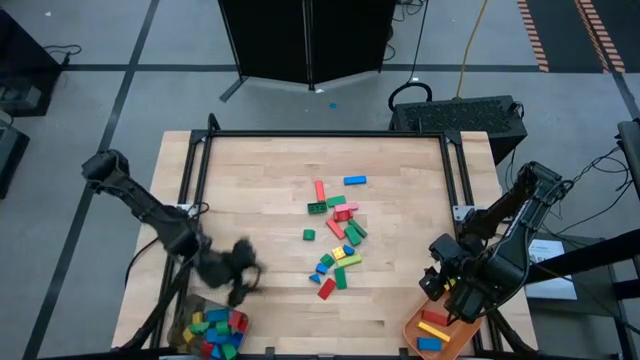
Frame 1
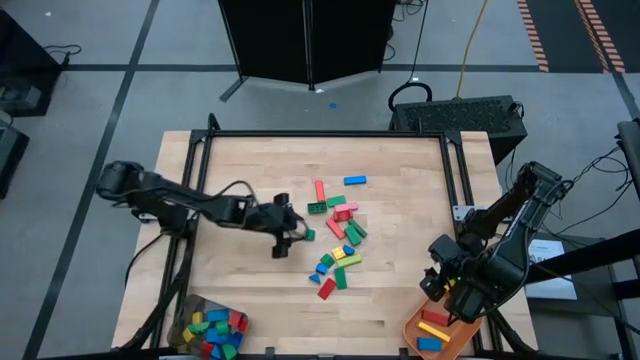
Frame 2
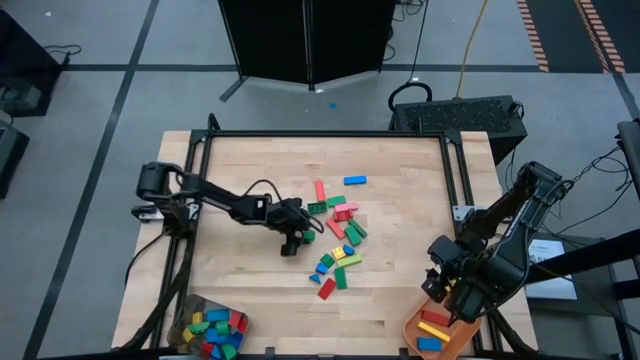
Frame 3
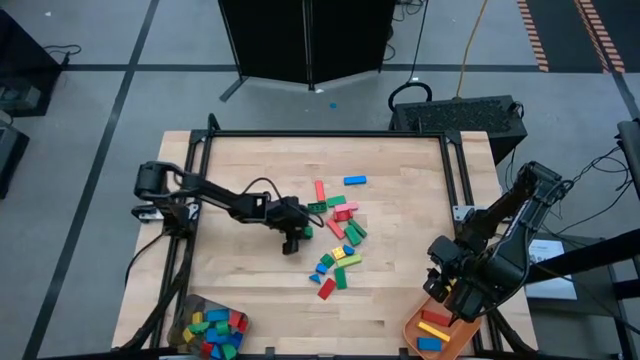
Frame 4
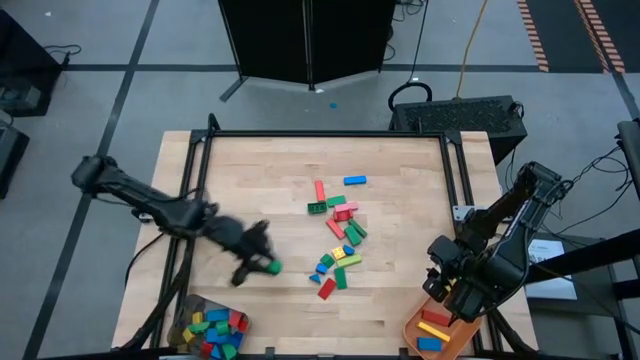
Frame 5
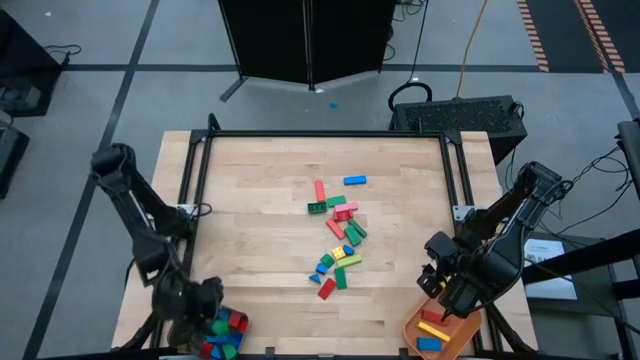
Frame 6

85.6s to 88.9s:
Task: Sort blocks by size
Put the green semicircle block into the black bin

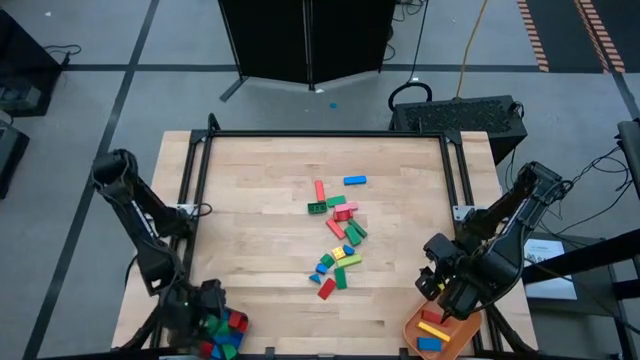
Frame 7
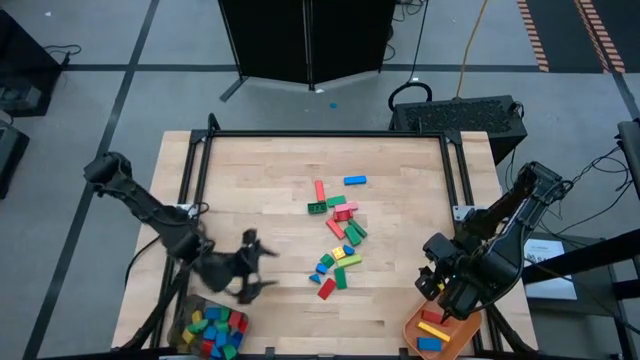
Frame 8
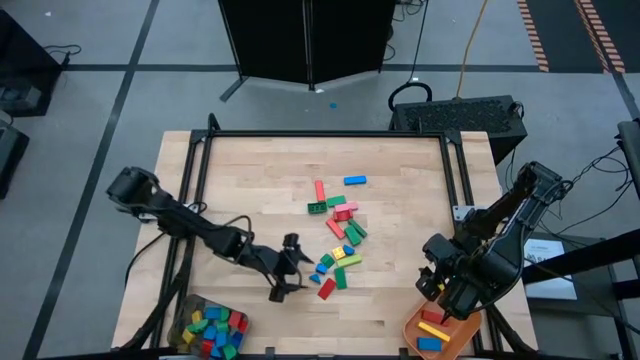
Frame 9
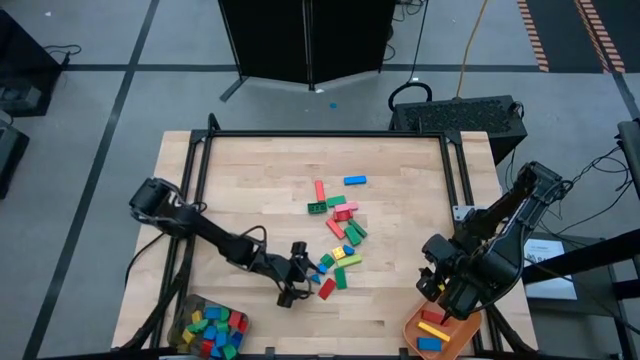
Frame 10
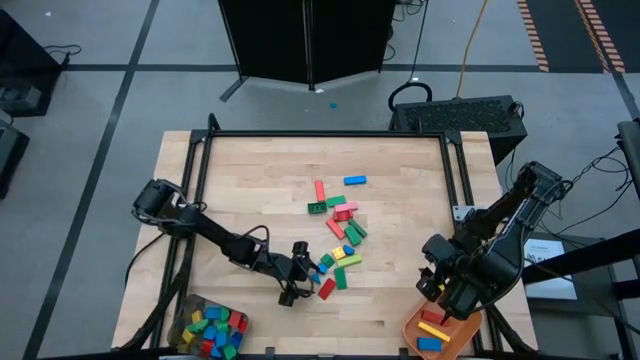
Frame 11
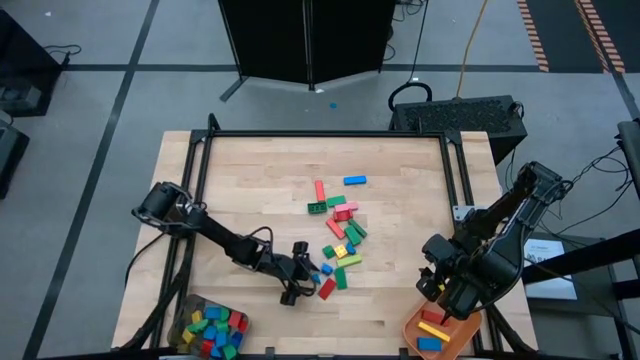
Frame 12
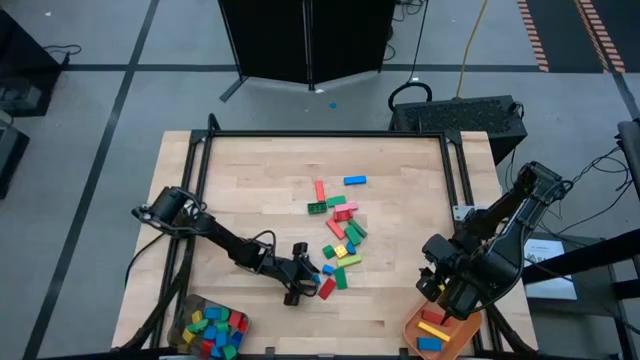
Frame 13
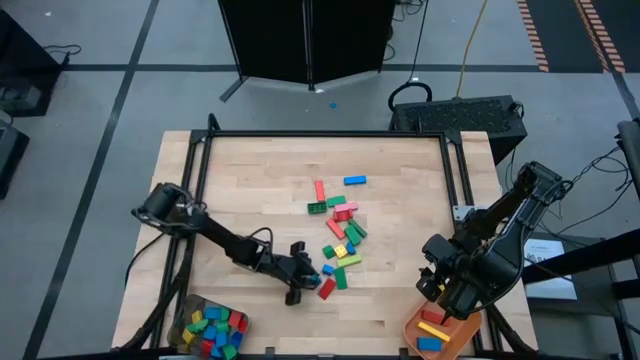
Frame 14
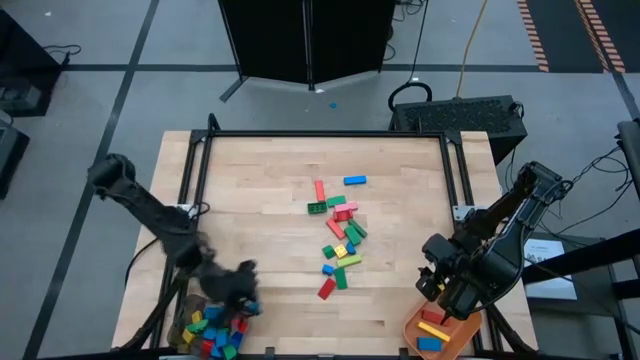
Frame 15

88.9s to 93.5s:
Put the blue triangular block into the black bin

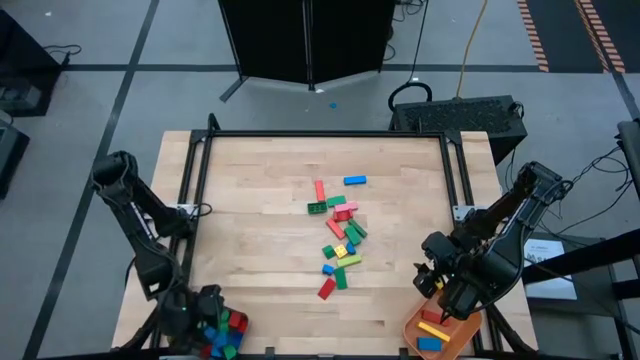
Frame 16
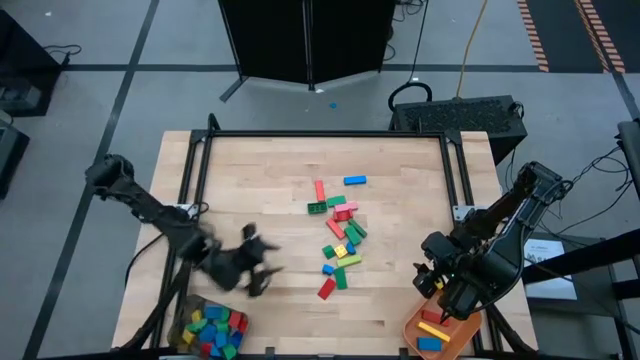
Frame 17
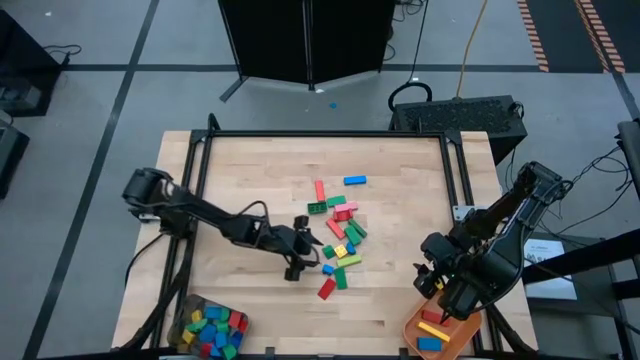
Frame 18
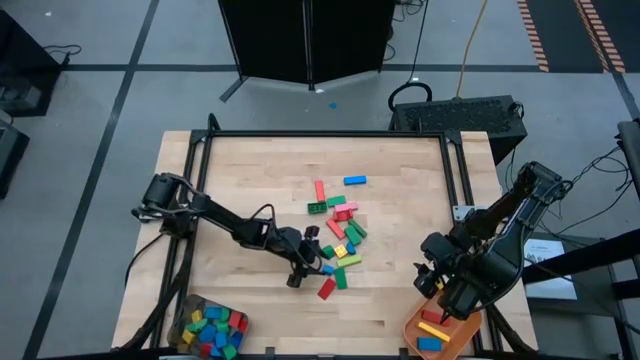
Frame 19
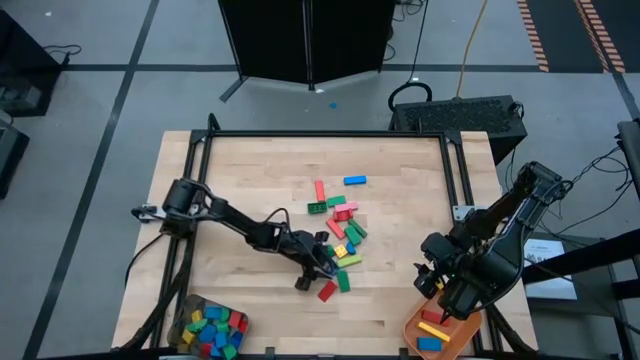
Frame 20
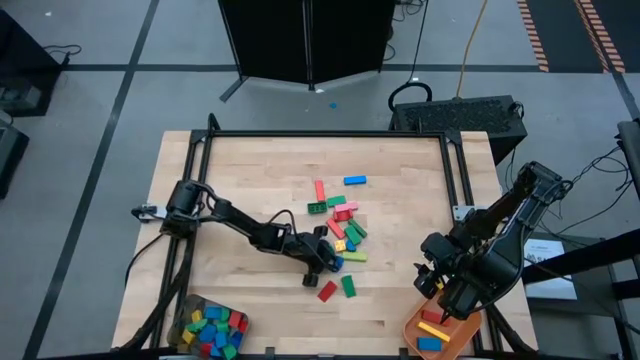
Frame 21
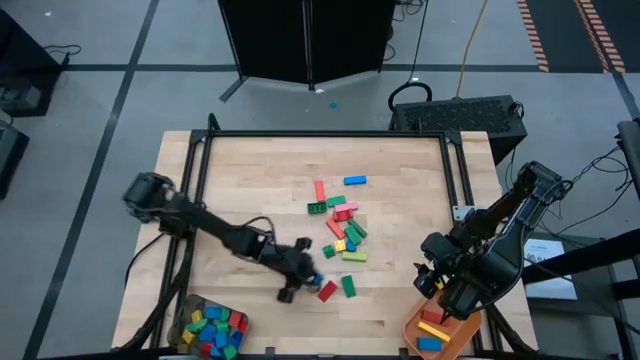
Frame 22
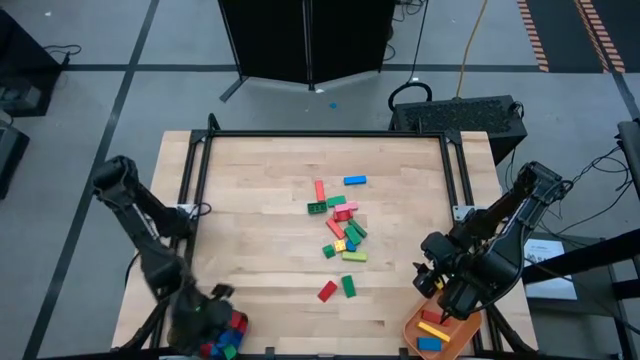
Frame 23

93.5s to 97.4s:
Put the blue square game piece into the black bin

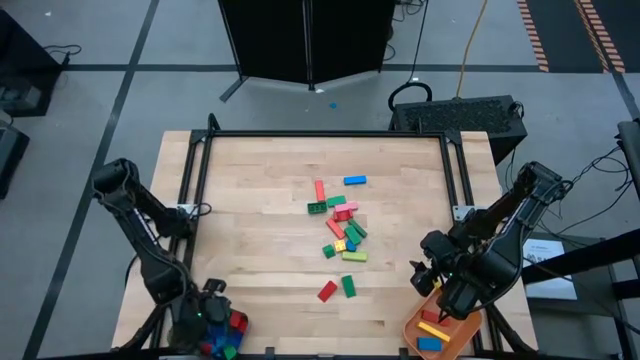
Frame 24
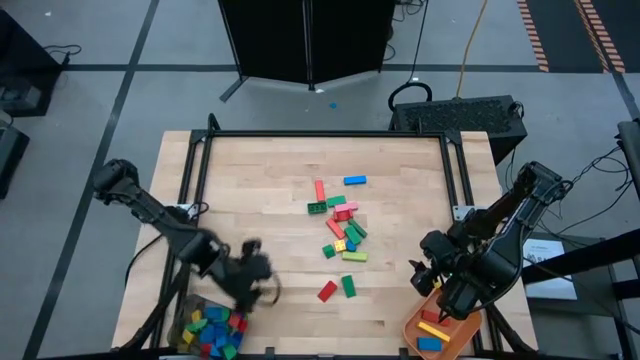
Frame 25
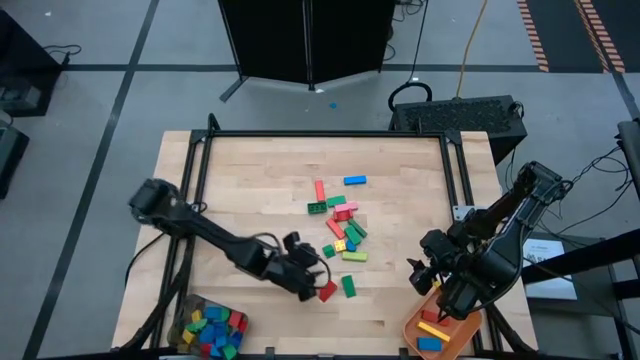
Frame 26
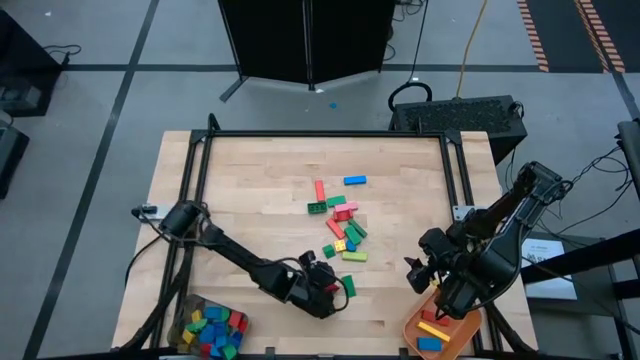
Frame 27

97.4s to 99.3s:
Put the red triangular block into the black bin

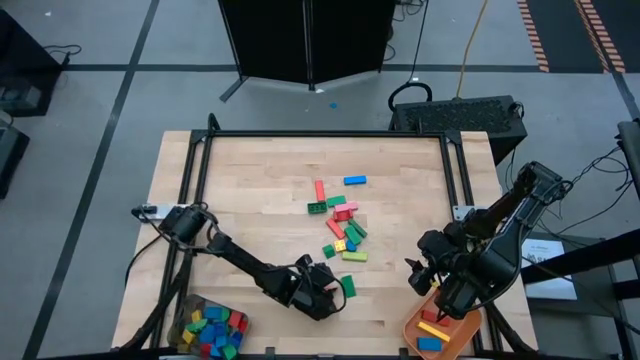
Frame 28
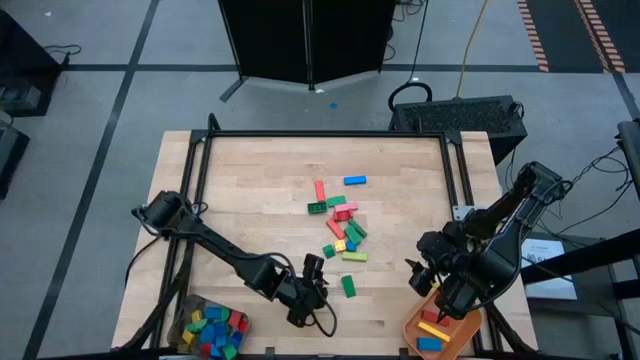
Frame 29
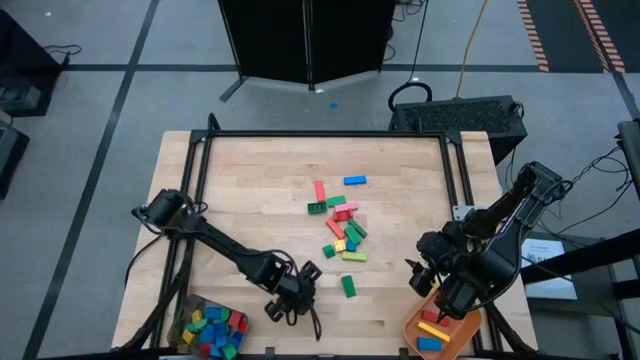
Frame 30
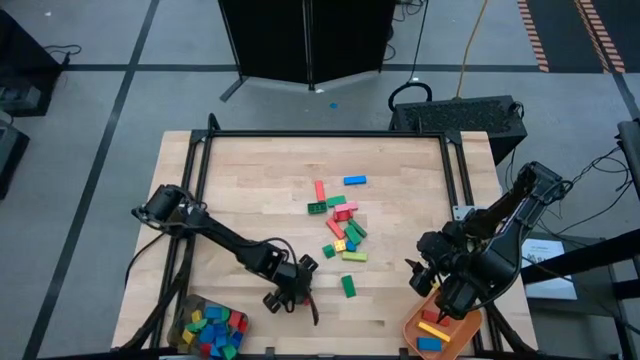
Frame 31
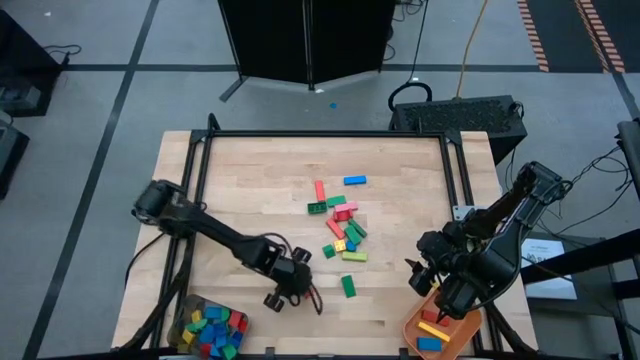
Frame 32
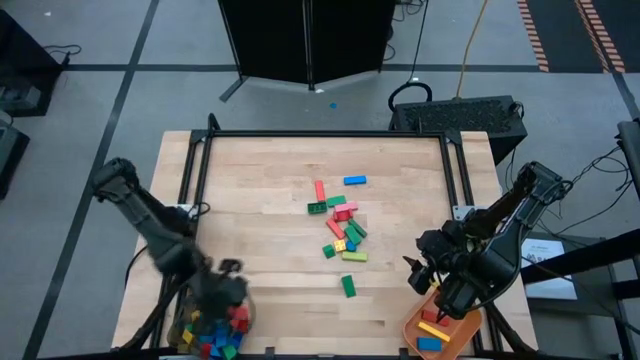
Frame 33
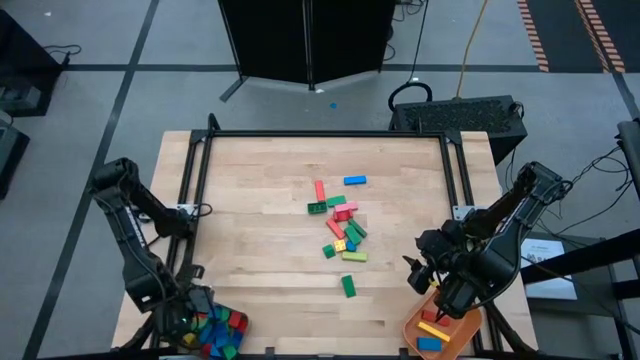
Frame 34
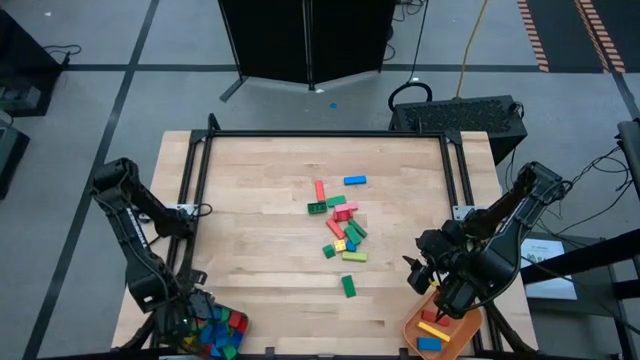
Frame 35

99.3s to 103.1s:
Put the red triangular block into the black bin

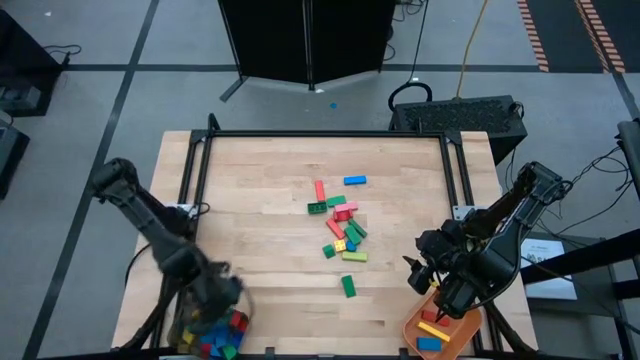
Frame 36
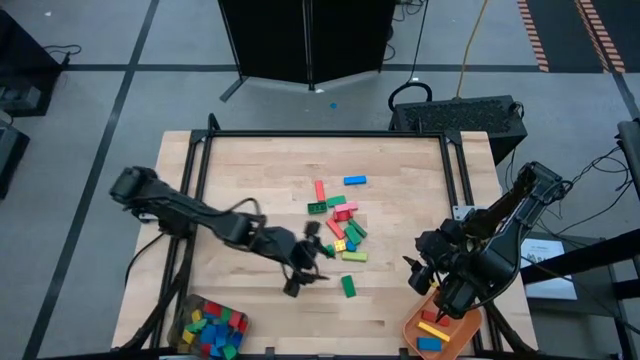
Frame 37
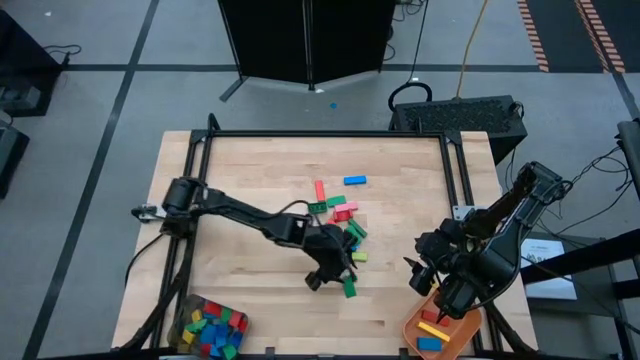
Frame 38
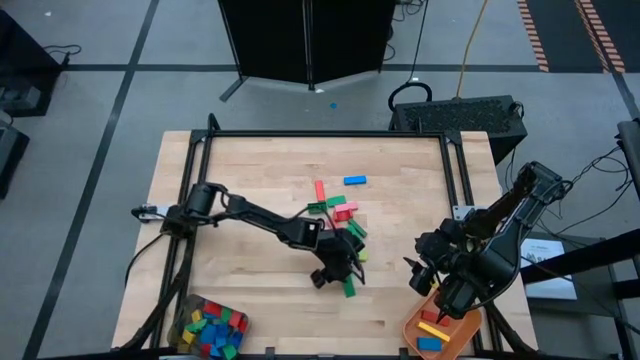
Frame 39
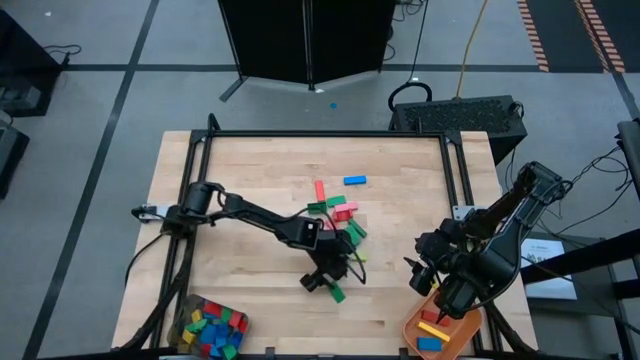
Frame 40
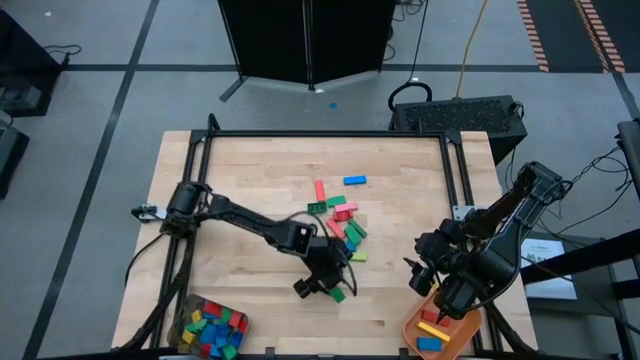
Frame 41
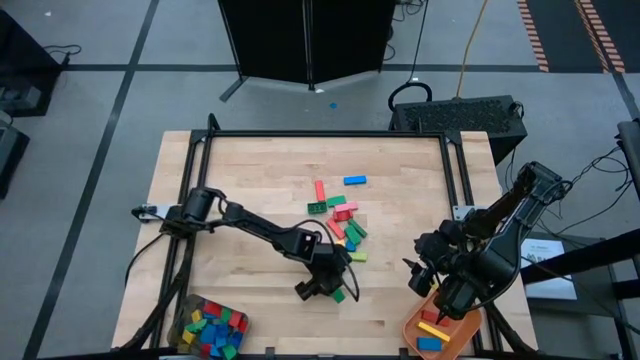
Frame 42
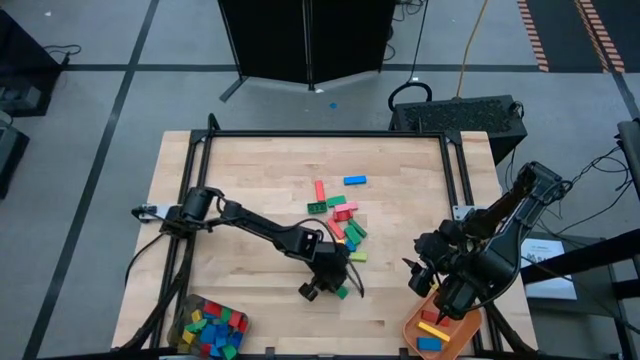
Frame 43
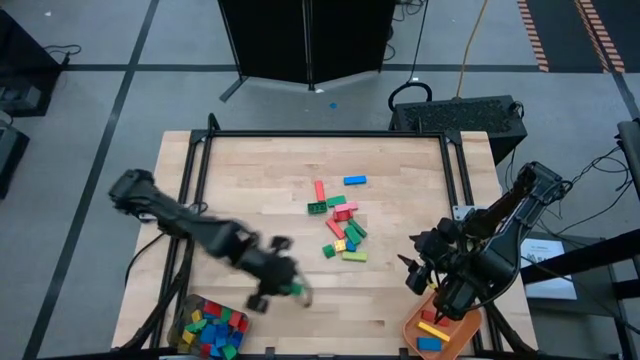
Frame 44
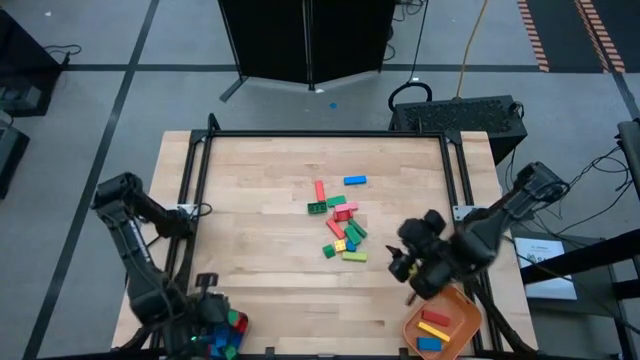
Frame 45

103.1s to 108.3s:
Put the green triangular block into the black bin
